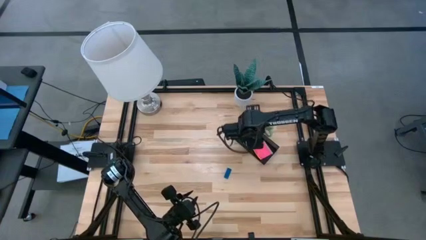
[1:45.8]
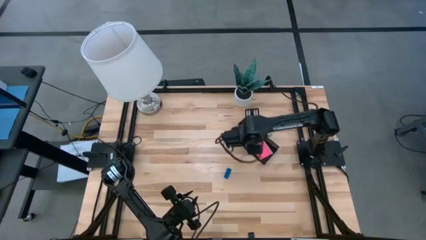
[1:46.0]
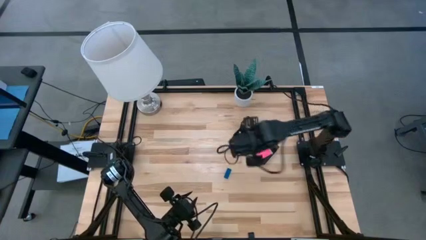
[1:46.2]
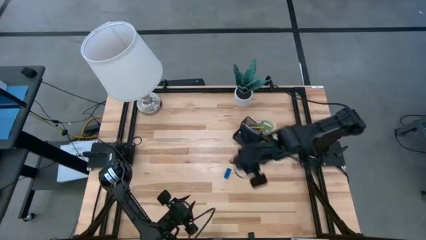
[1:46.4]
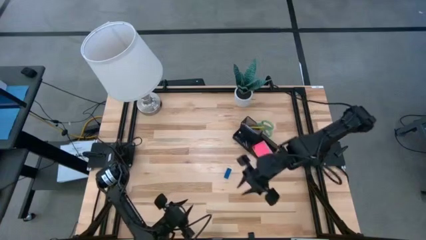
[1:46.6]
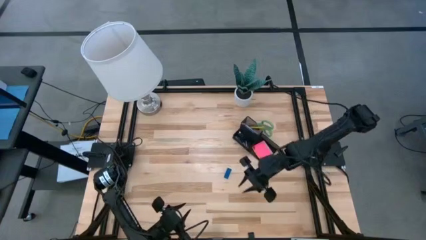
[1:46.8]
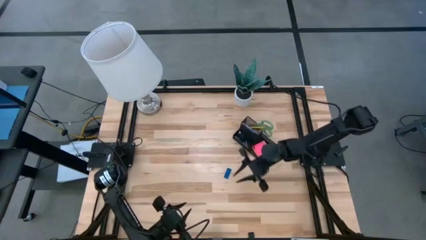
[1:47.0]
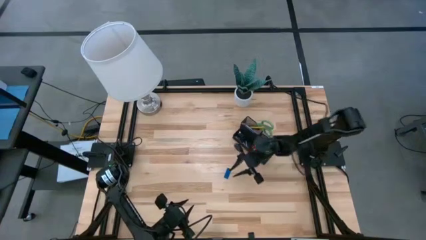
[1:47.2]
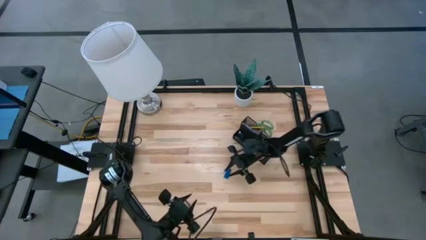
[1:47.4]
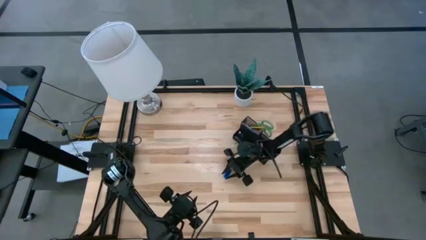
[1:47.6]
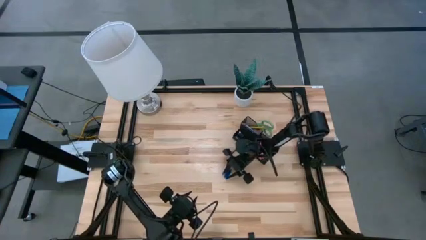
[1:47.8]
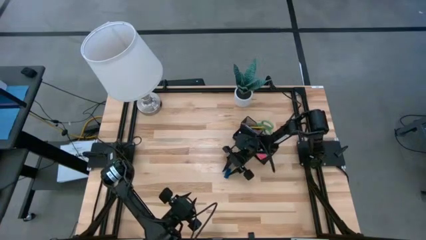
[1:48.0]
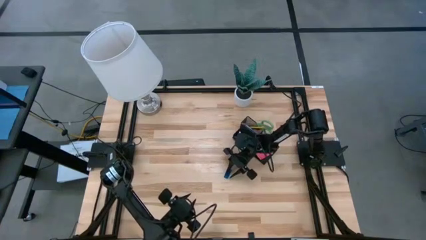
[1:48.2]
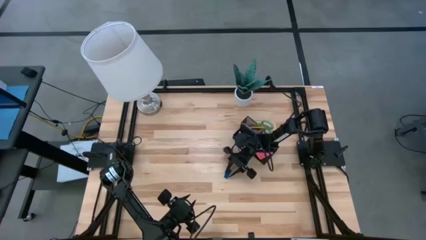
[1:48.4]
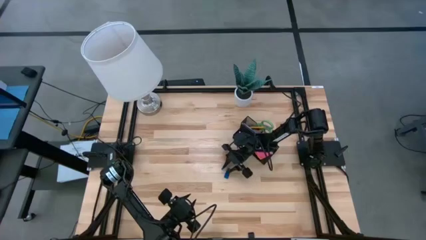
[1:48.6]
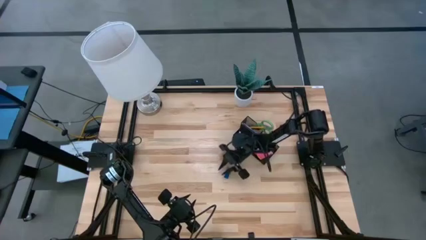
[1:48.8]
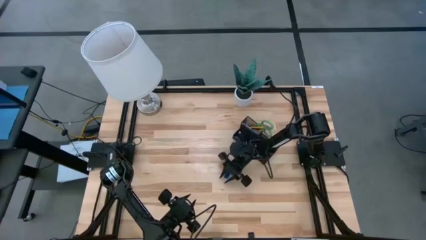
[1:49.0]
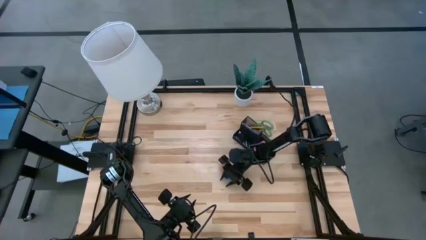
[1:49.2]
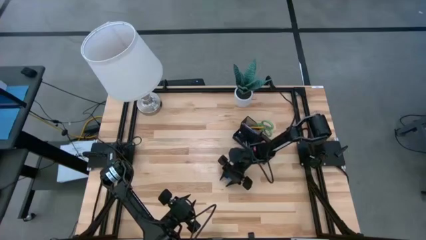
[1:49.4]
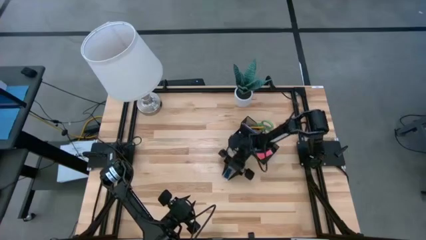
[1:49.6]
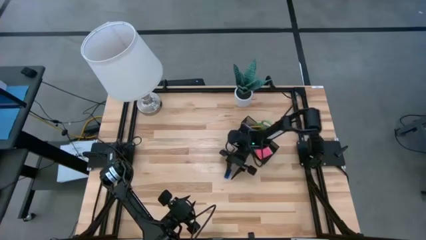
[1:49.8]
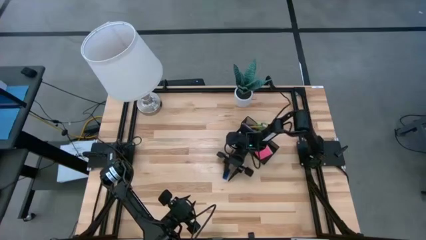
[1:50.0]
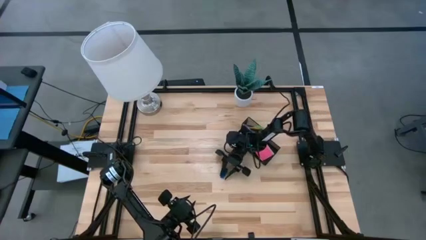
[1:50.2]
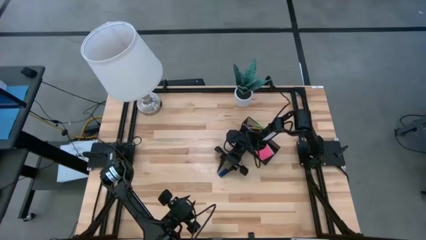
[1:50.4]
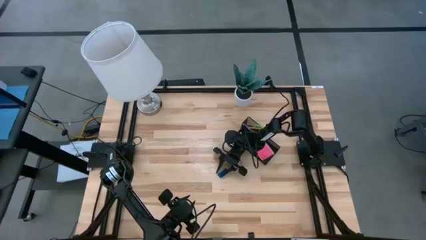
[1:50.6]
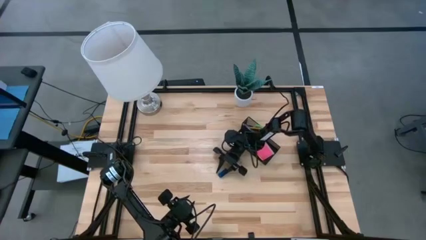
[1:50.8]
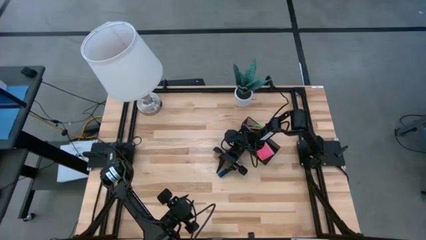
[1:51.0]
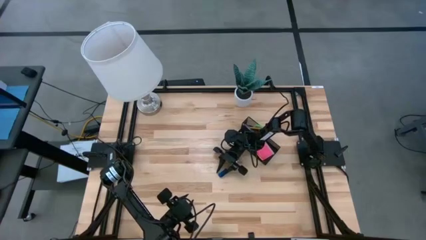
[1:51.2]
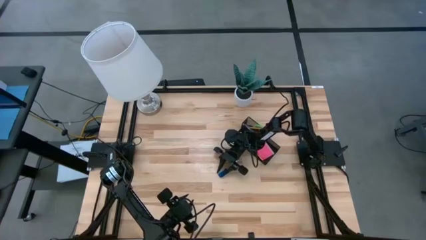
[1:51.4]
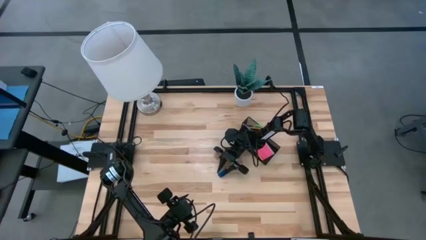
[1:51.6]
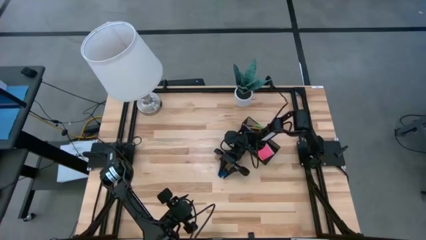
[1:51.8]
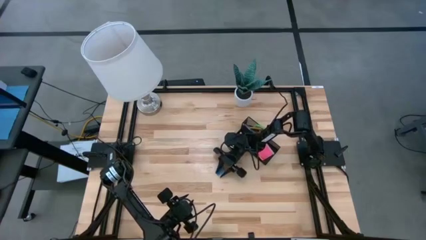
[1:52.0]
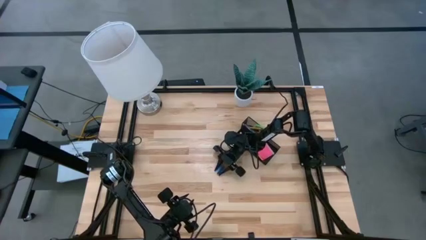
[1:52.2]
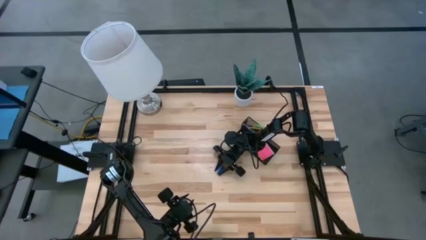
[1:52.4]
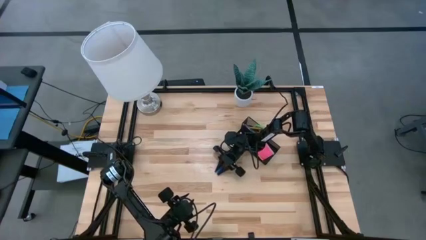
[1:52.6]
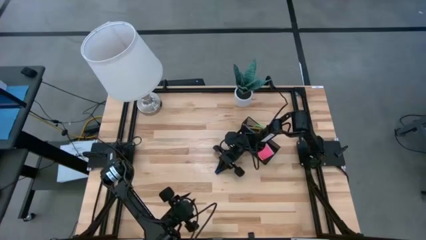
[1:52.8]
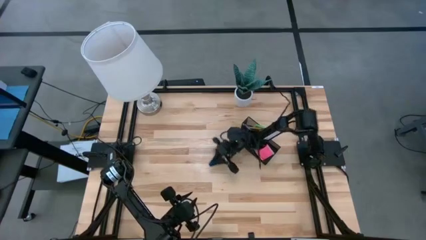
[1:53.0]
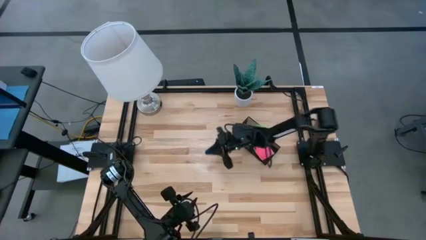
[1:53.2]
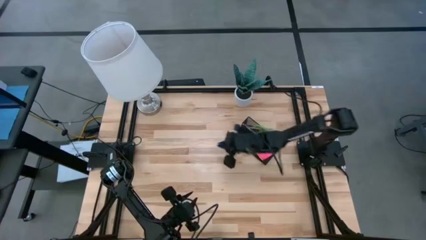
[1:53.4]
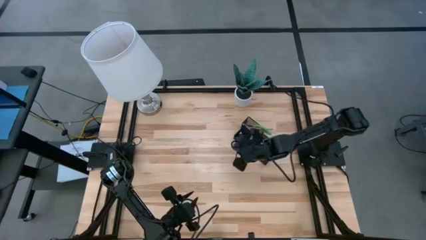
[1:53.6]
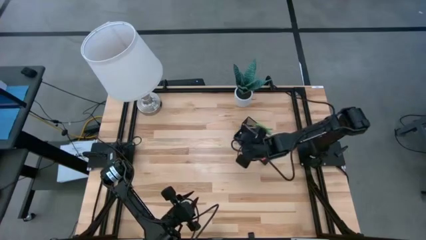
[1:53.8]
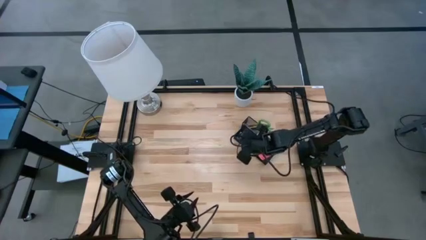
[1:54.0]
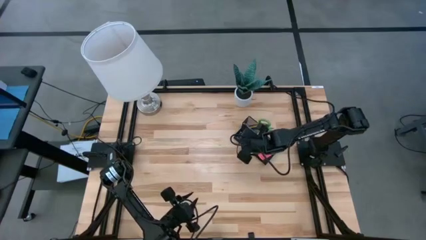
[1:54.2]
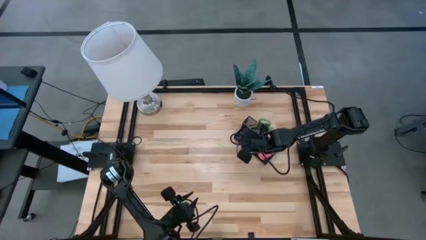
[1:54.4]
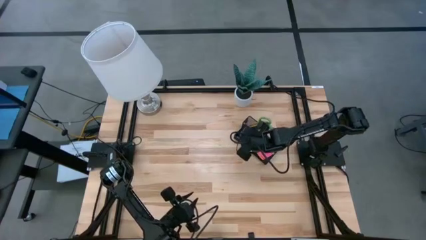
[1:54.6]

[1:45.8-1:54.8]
Task: Pick and place office supplies into organizer
Put the blue eraser into the desk organizer

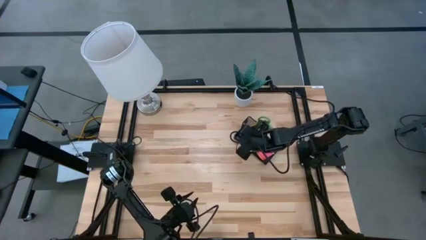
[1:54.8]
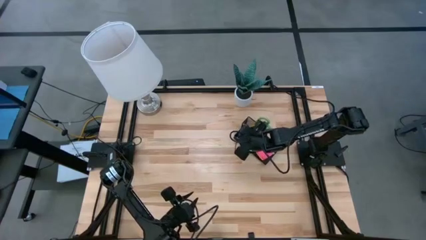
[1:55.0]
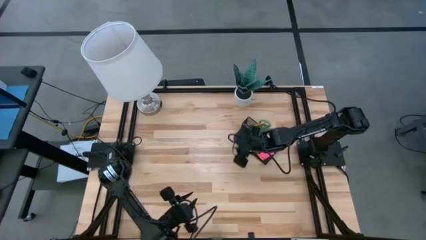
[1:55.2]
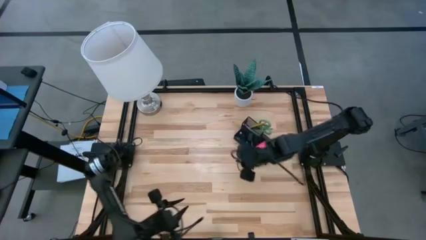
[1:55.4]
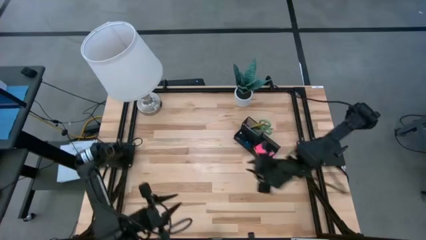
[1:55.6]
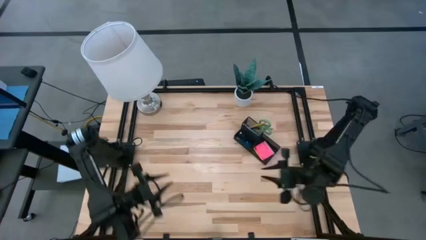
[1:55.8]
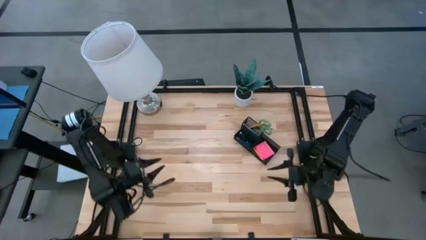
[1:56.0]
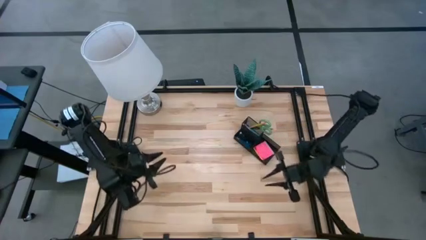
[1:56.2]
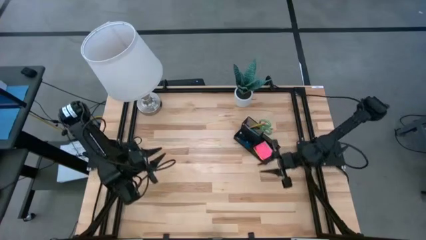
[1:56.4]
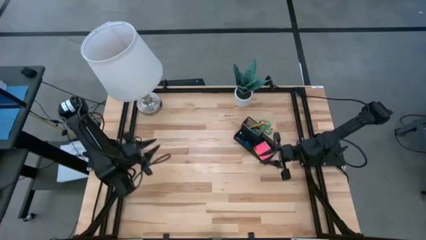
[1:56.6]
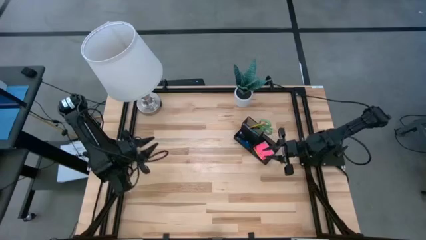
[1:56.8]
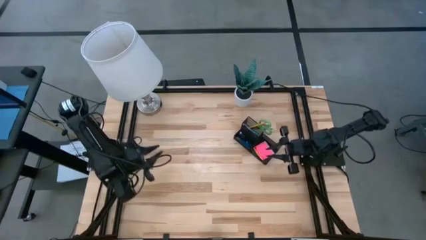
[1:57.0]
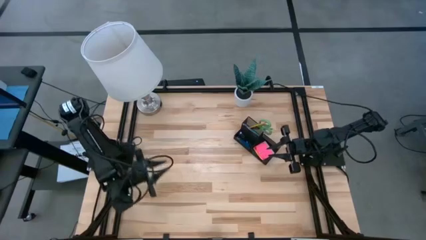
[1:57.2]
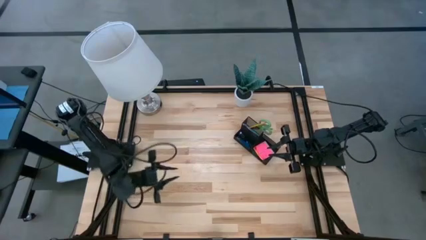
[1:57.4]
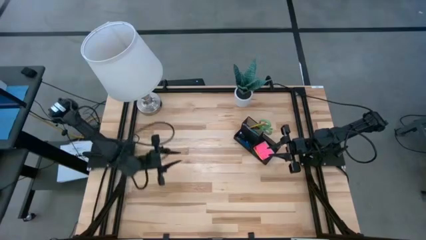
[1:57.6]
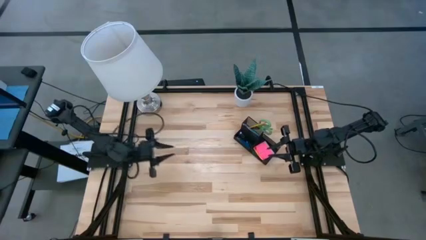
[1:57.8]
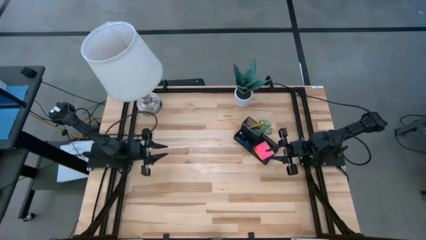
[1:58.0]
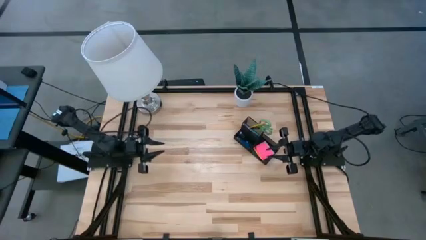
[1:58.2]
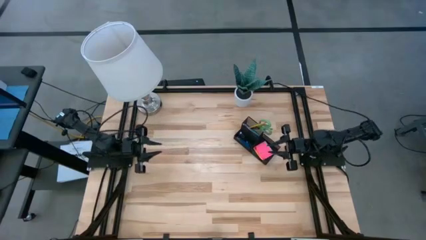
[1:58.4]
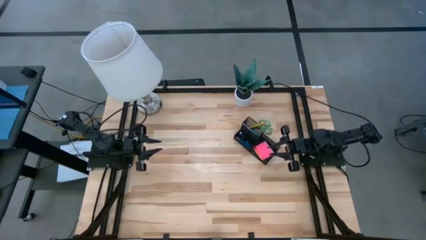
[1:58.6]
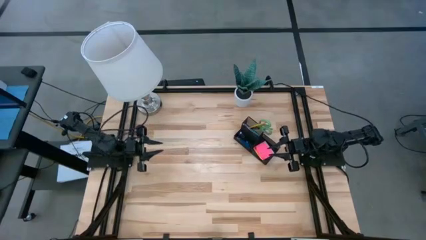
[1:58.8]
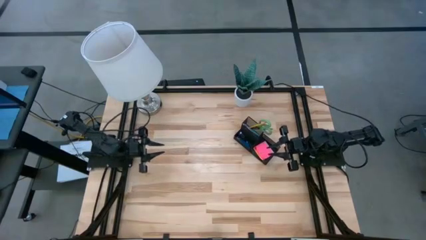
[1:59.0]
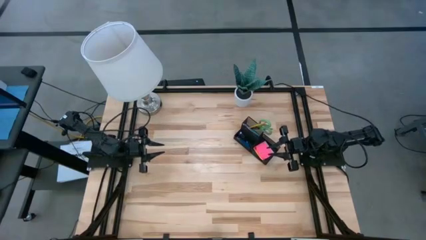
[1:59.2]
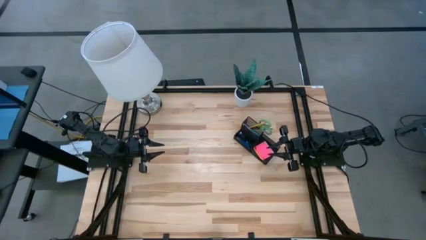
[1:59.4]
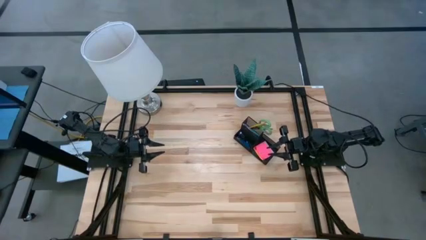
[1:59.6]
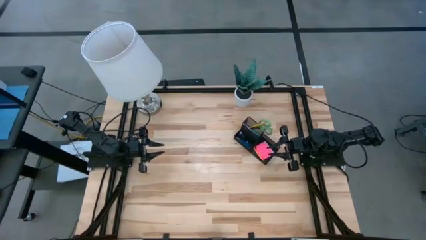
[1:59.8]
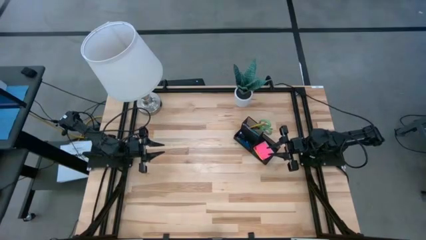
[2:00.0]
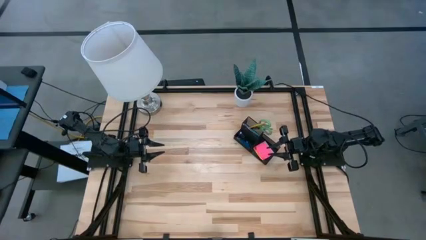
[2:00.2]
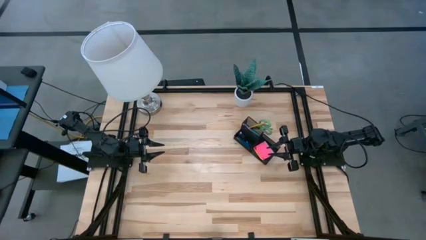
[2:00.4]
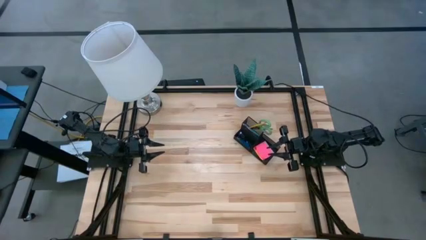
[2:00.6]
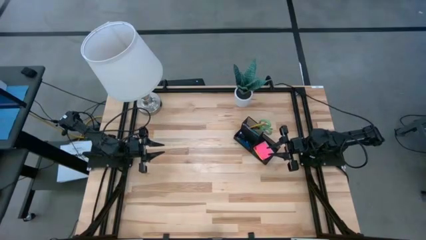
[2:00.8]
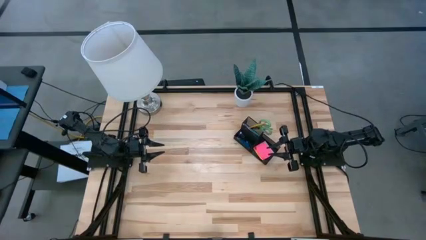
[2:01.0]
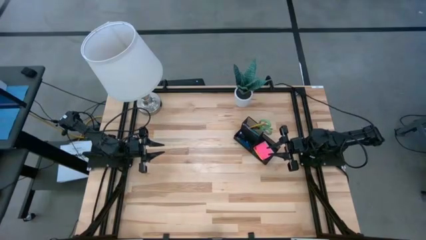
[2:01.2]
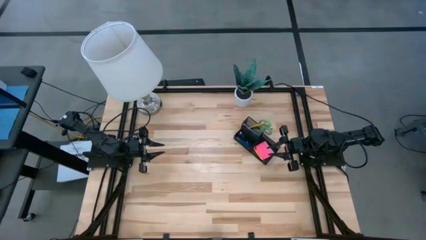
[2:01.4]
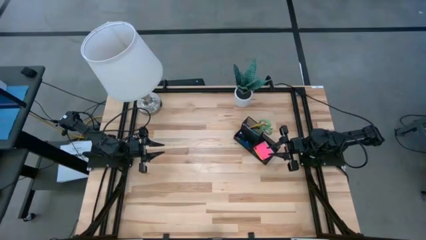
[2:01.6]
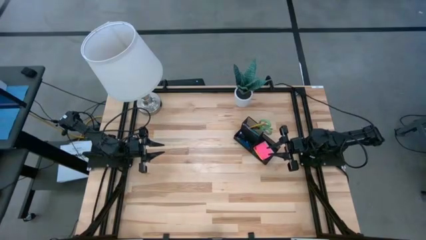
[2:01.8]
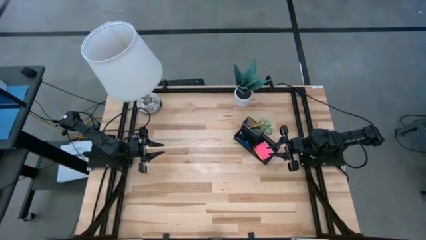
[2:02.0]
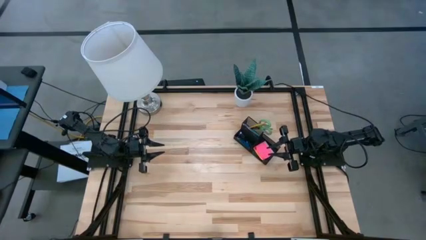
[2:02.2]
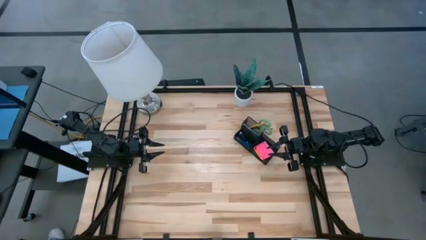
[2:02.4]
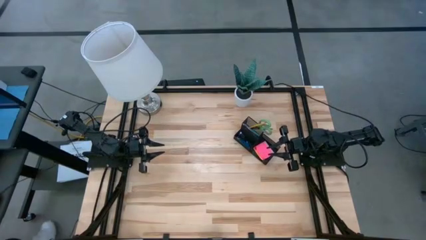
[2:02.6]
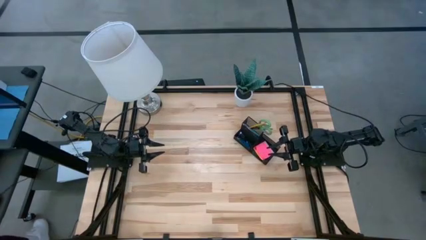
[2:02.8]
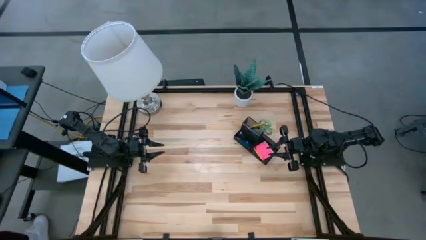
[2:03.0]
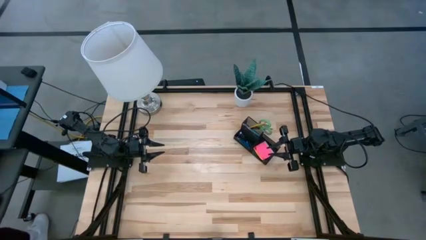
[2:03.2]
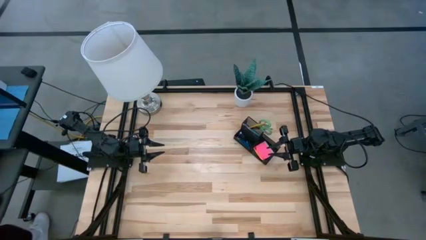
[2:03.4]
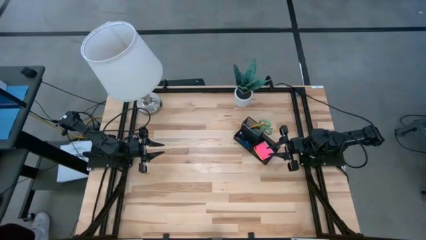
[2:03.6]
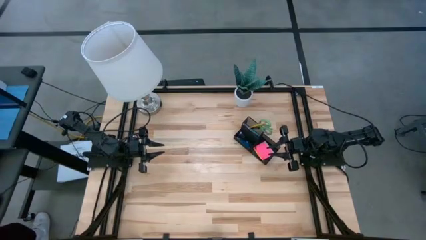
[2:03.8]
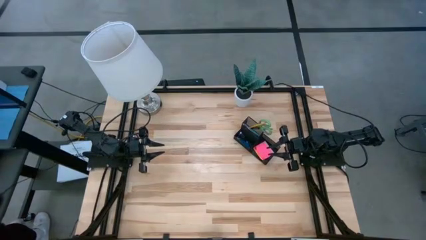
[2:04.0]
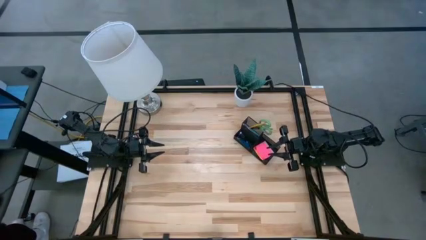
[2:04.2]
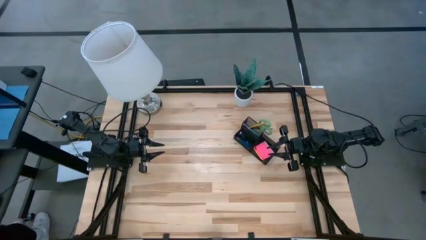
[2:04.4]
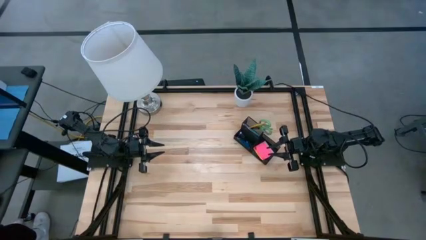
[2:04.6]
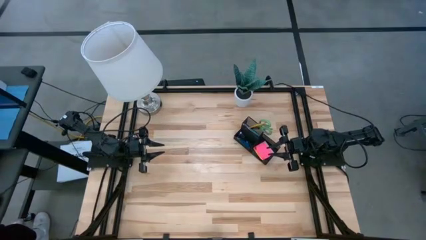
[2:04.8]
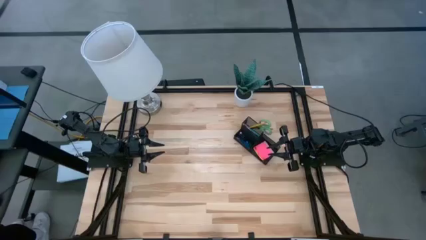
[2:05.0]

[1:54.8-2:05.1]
Return to Home Position
